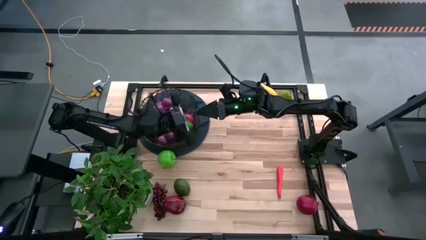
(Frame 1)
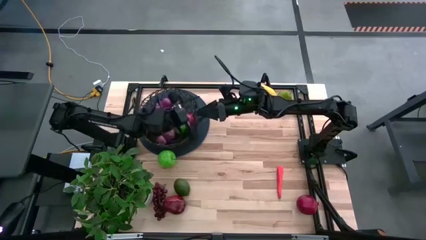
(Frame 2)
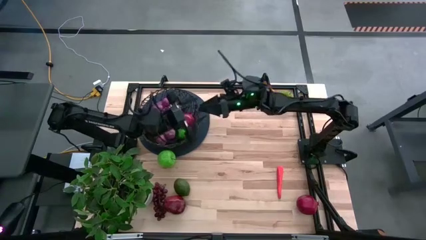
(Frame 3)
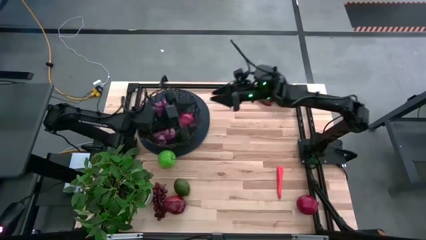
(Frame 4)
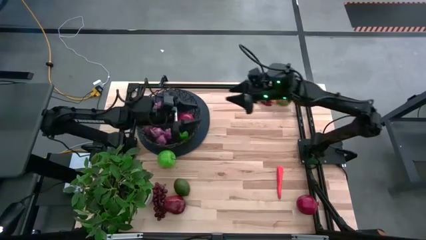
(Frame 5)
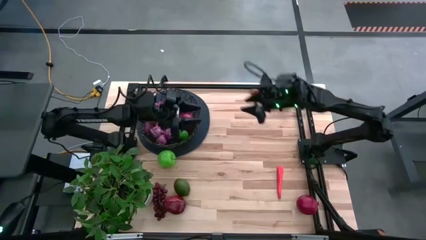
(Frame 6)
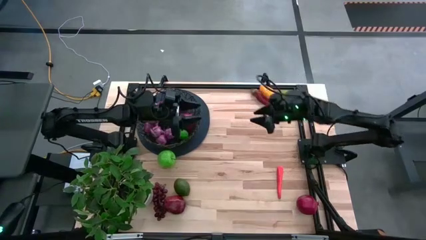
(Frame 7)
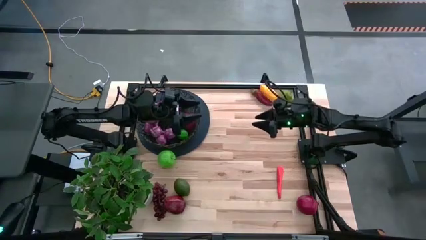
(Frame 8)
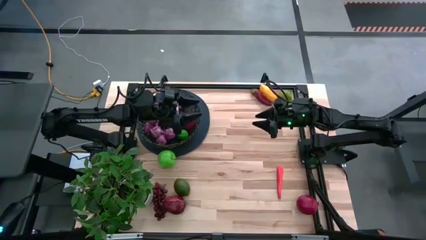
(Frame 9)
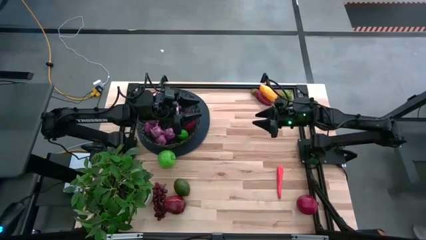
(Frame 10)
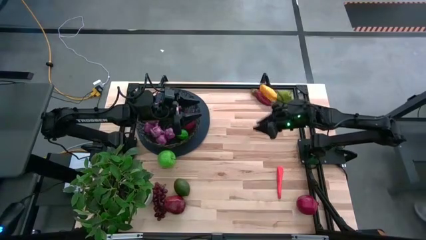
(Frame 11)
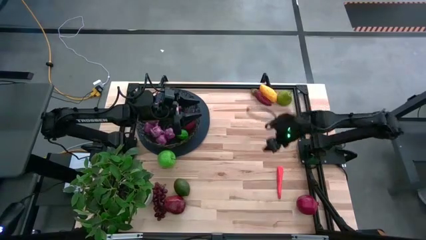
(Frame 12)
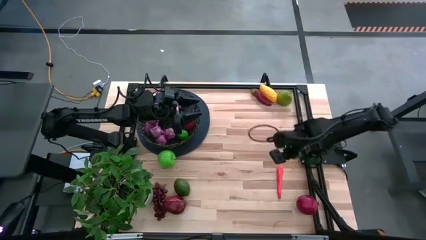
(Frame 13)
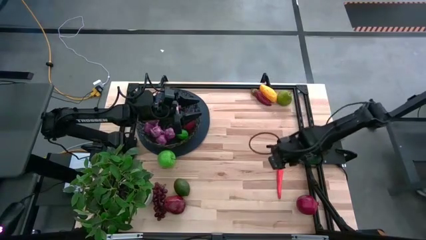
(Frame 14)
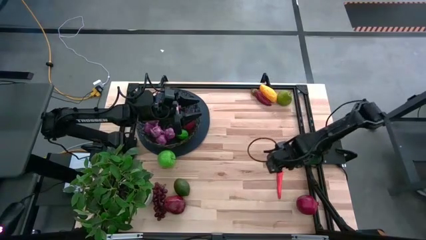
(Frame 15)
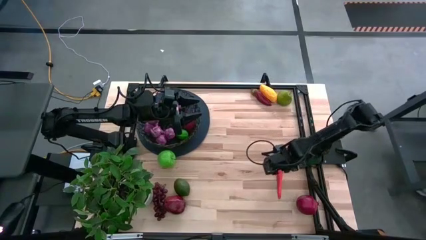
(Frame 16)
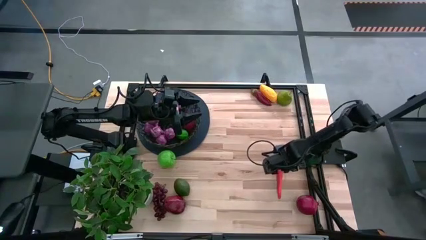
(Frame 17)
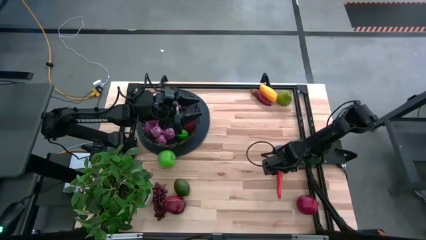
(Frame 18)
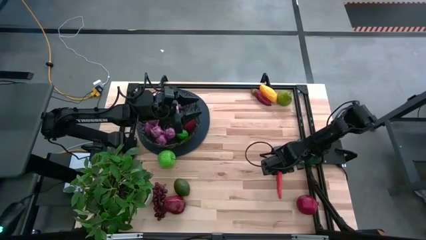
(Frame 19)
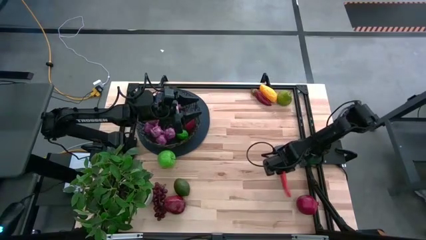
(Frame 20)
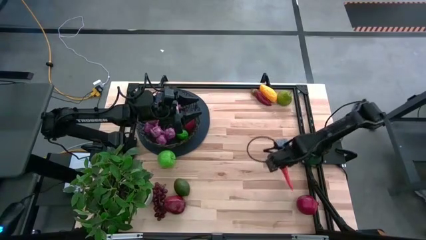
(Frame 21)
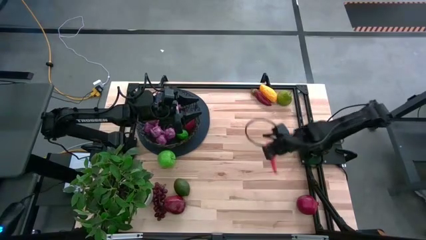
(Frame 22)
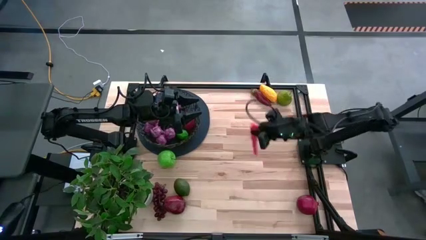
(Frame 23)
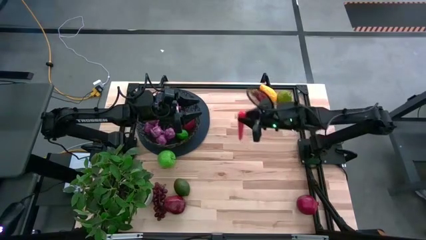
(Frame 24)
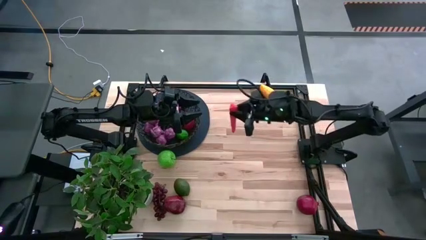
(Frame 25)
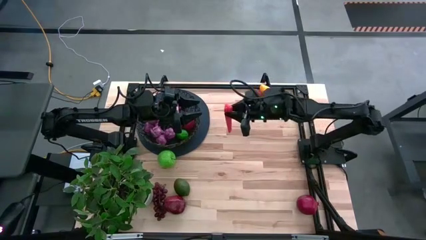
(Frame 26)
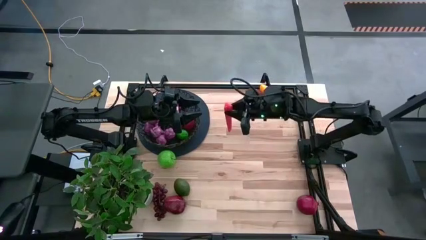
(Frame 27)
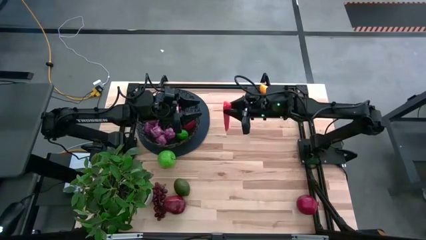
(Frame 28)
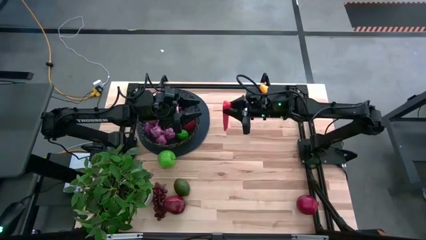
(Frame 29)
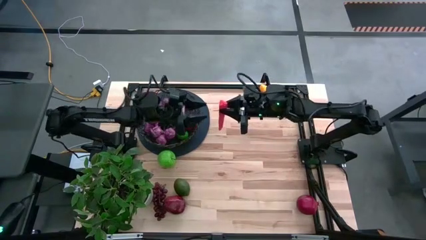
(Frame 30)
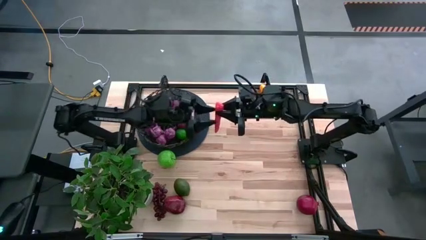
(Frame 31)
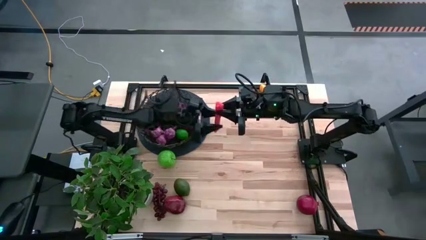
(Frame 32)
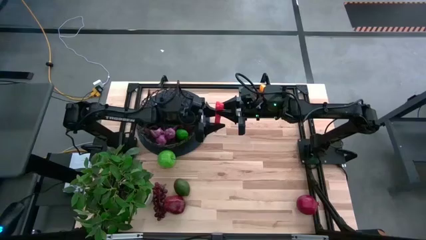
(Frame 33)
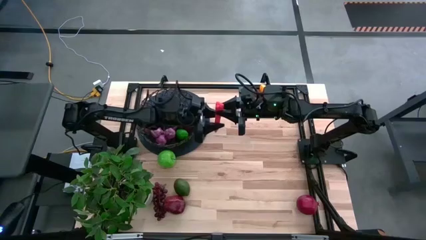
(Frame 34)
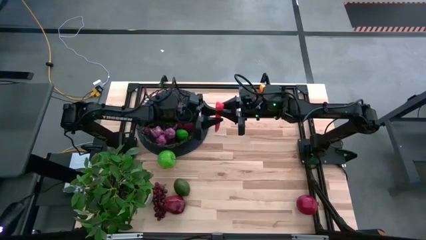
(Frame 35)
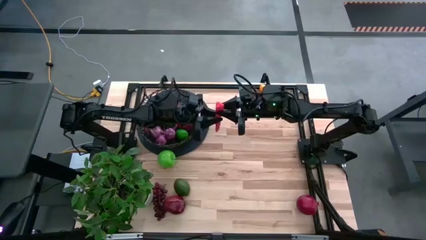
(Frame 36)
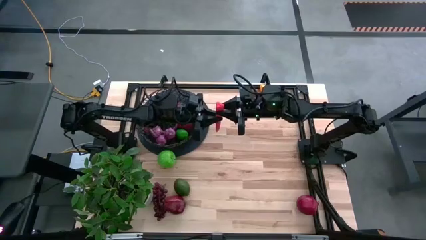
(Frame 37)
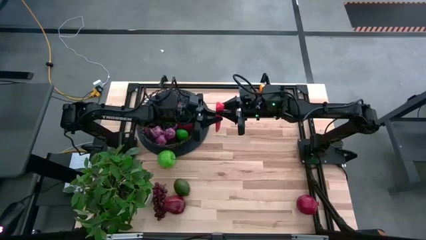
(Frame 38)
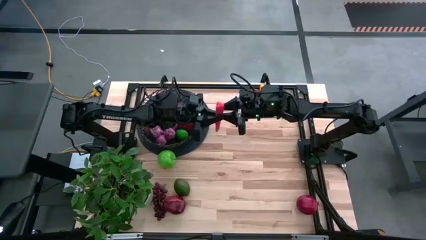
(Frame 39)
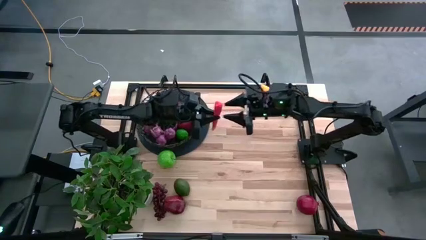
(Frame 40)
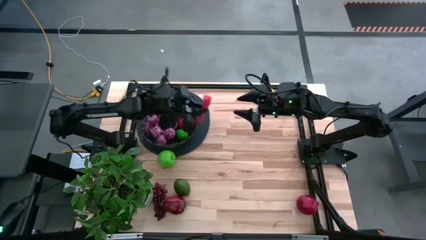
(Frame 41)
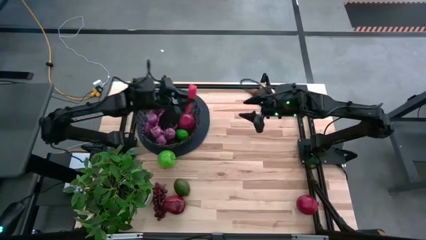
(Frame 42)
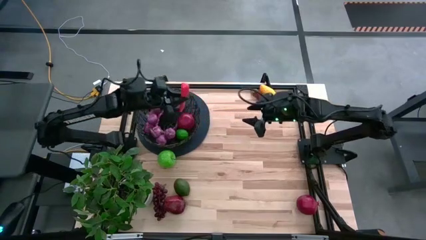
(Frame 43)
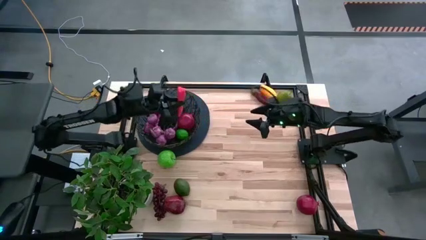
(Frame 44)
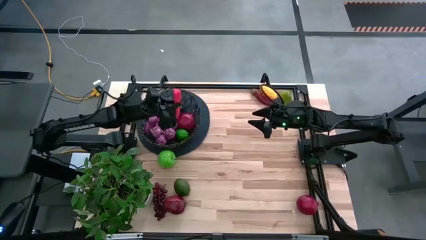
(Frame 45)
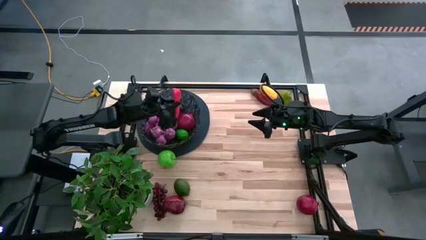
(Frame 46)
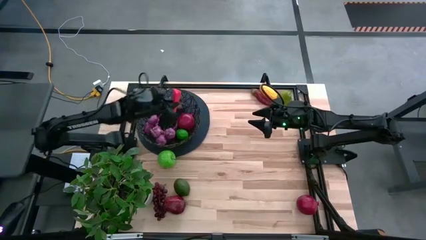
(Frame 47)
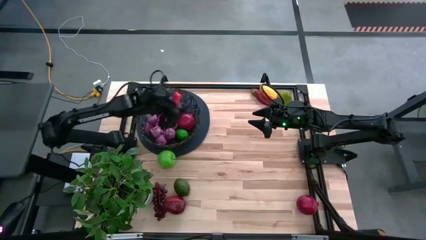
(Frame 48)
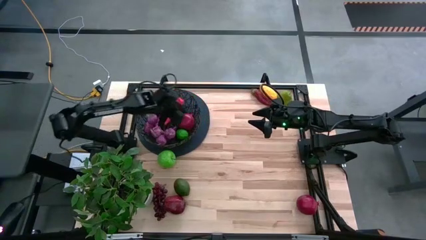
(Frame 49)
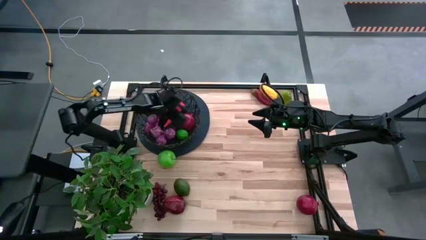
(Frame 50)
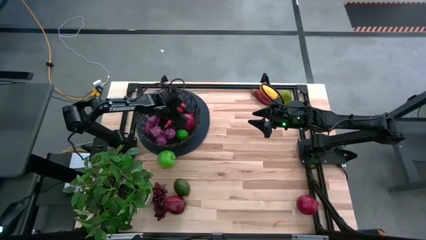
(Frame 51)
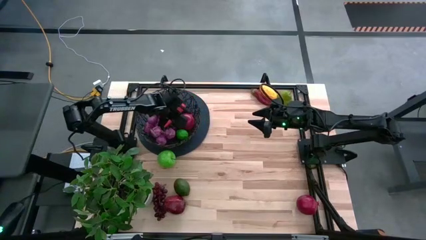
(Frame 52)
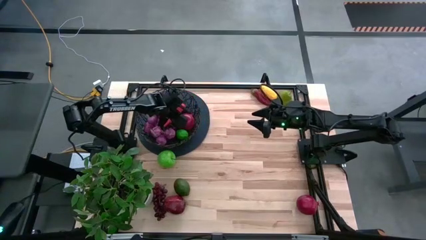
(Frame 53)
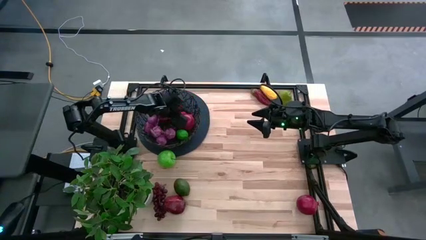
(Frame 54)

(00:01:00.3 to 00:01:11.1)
Task: Build produce basket
Put the carrot into the wire basket

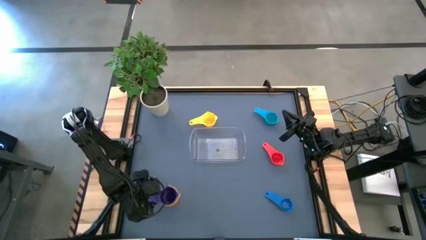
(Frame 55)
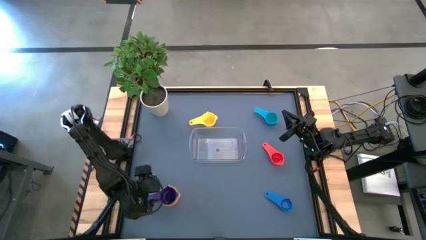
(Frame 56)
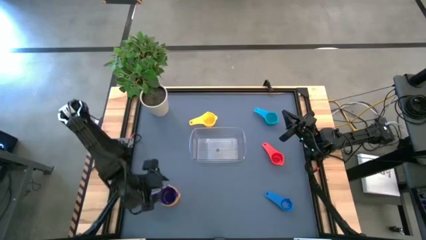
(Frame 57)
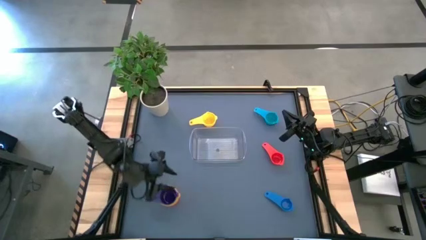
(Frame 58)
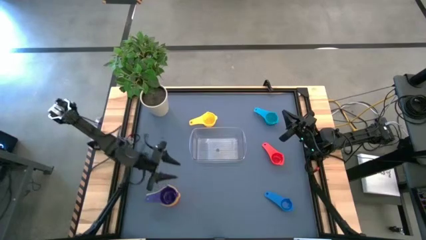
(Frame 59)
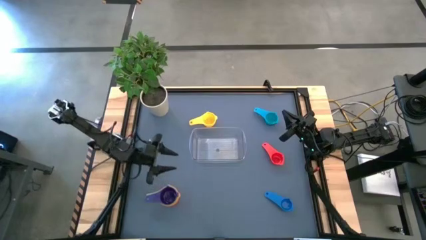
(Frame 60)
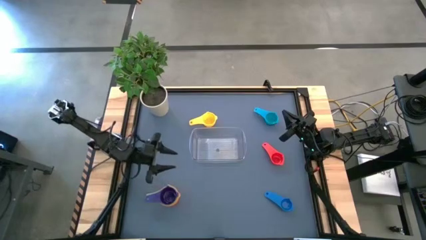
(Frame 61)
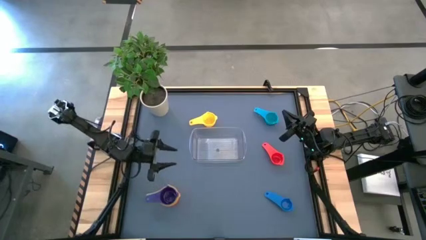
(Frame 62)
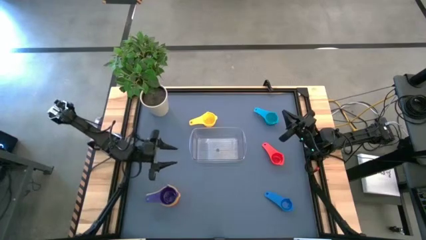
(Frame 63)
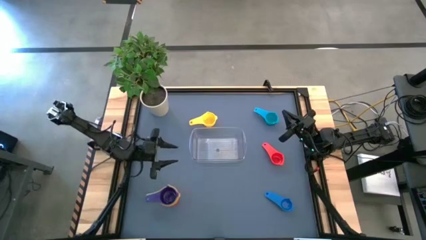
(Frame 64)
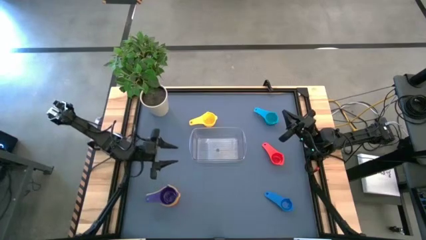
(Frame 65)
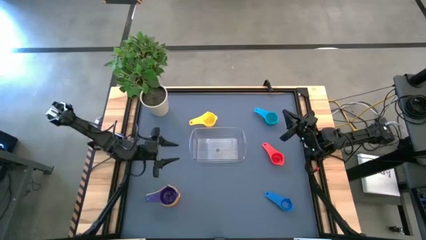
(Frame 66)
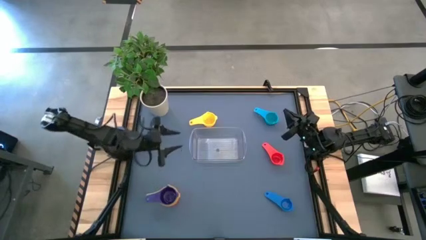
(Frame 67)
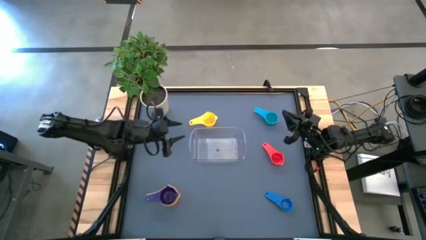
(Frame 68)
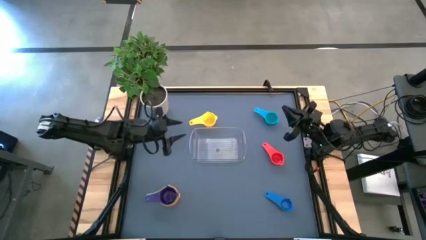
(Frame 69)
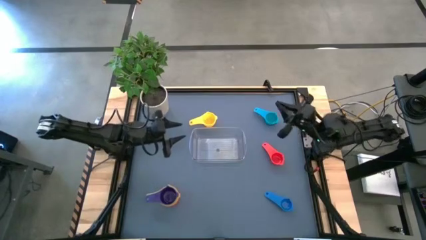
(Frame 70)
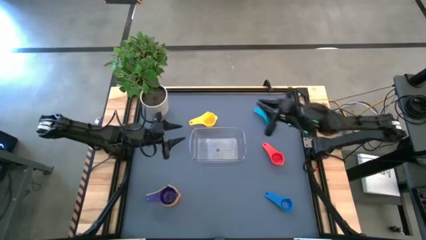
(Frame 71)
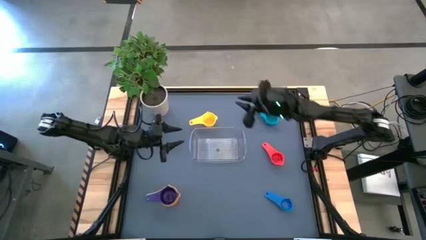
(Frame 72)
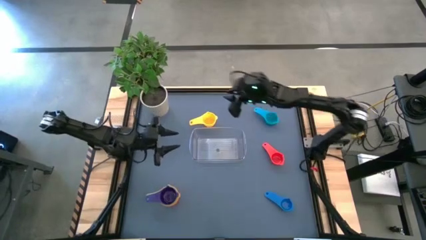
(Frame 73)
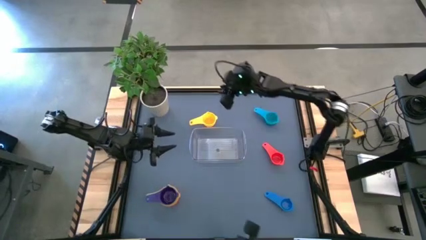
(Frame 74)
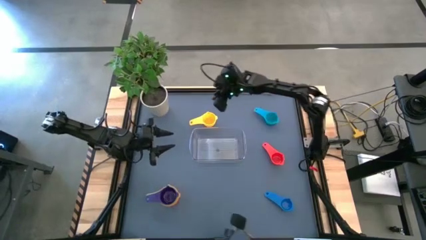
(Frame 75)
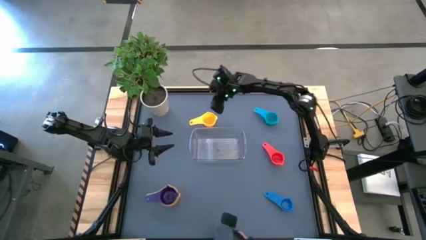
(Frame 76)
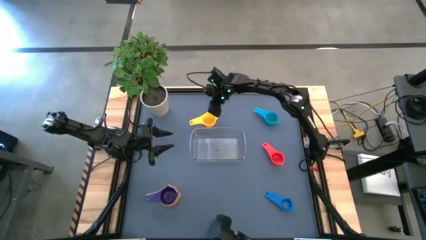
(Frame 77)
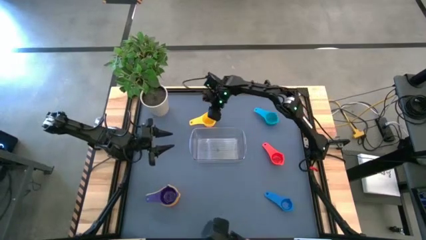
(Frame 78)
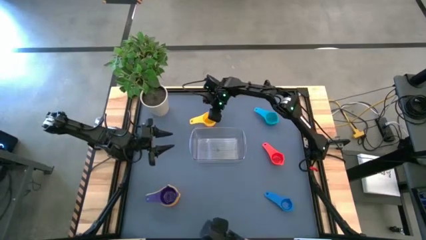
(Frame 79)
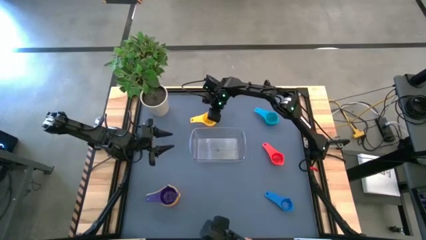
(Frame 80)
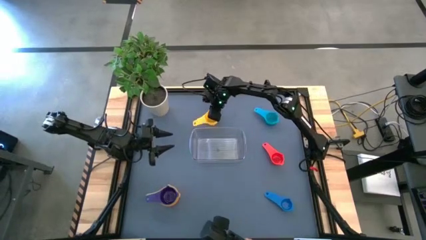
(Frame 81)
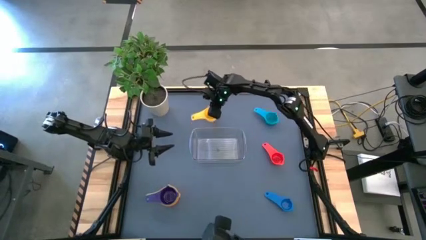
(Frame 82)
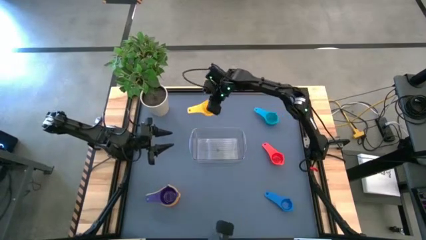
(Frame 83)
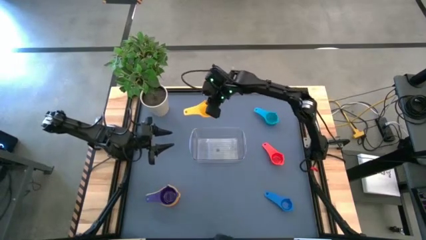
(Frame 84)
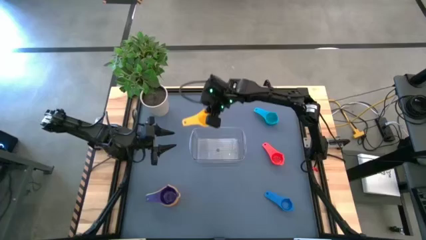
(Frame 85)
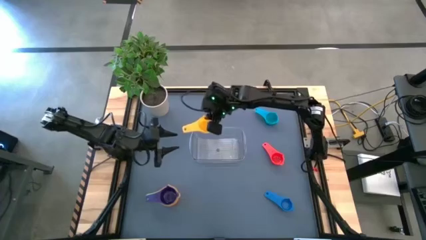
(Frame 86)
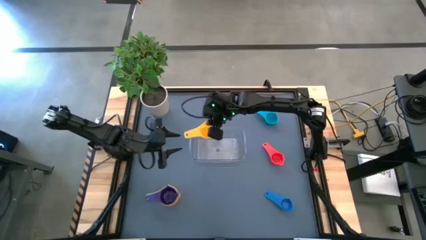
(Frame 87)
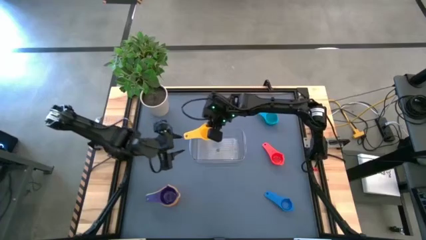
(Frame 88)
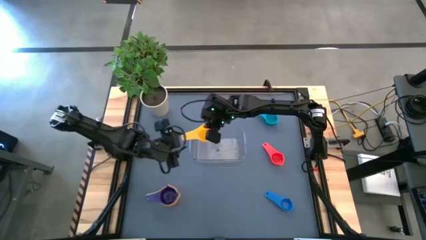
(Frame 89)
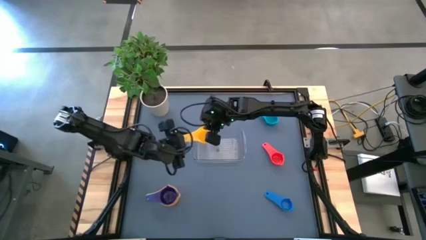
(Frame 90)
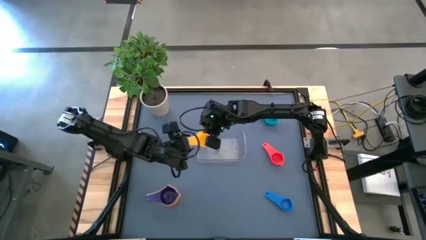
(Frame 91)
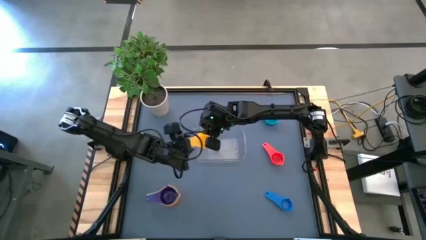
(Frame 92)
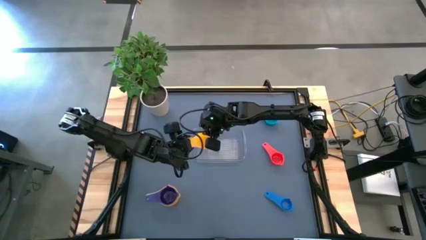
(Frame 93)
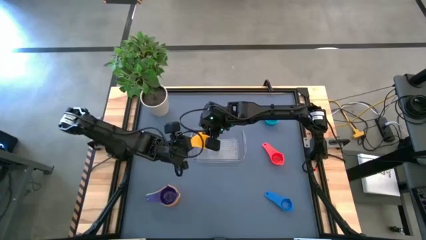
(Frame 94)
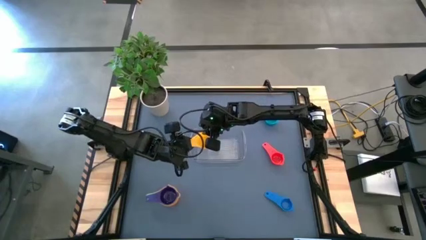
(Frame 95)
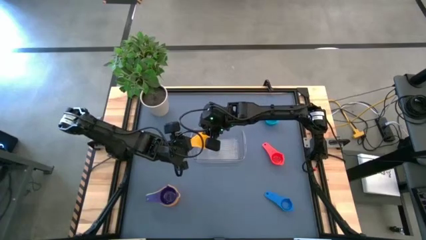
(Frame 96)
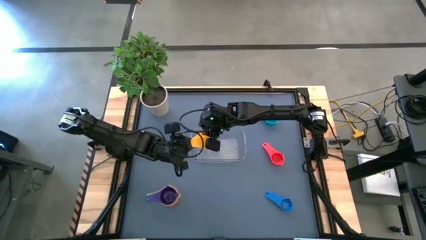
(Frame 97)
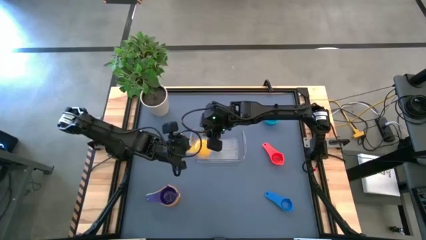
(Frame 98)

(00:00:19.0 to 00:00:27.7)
Task: Nest measuring cups in basket
Stack the yellow measuring cup on top of the violet measuring cup
